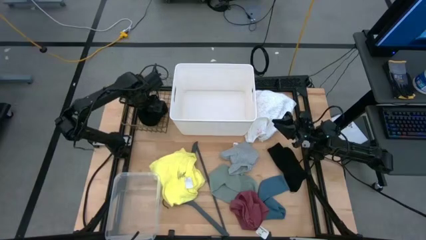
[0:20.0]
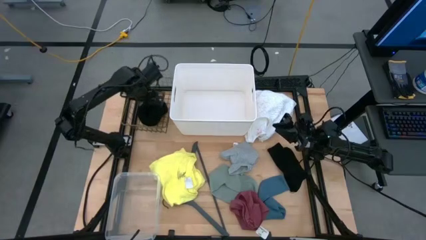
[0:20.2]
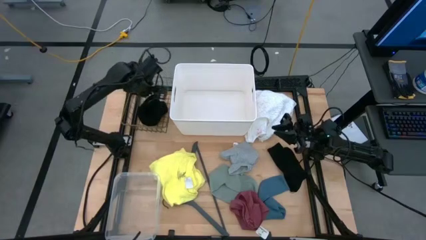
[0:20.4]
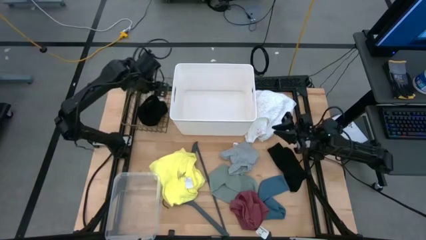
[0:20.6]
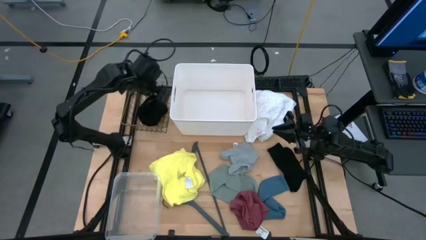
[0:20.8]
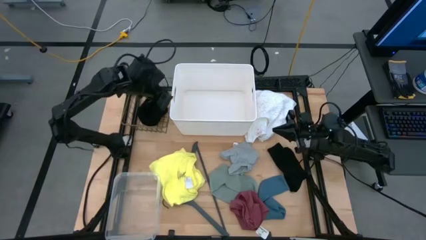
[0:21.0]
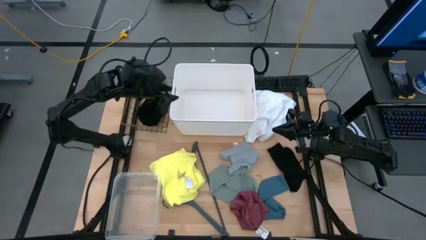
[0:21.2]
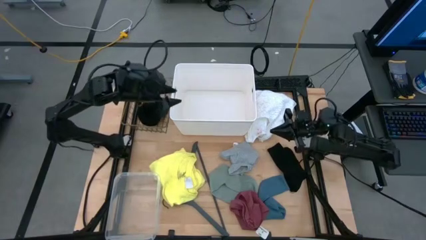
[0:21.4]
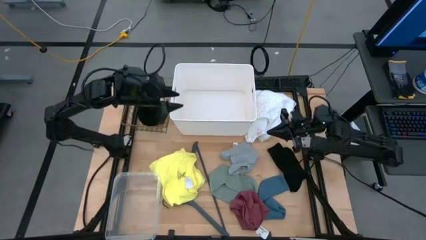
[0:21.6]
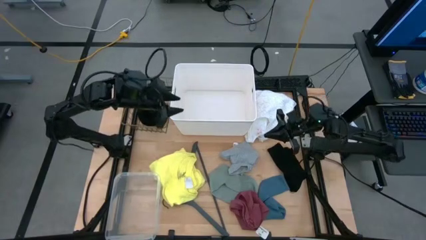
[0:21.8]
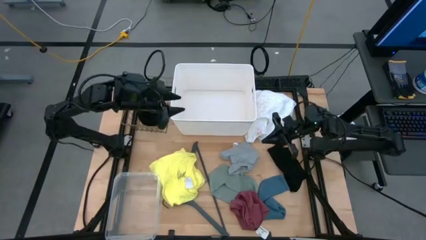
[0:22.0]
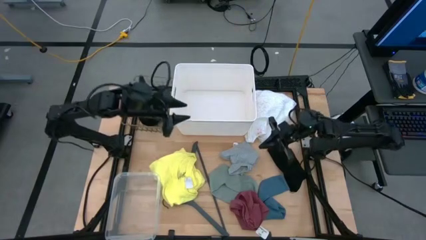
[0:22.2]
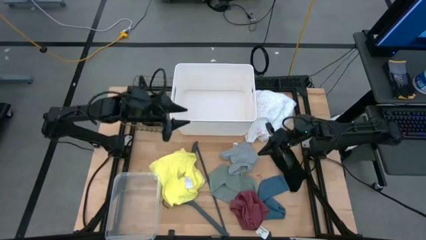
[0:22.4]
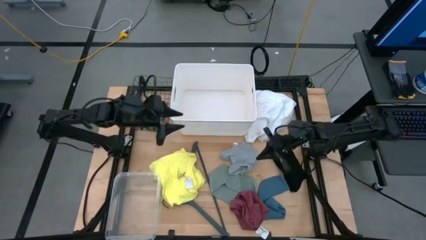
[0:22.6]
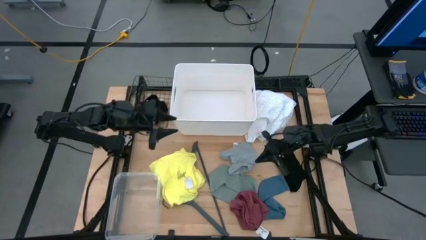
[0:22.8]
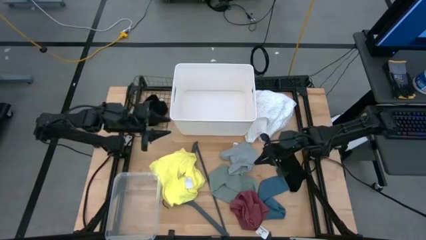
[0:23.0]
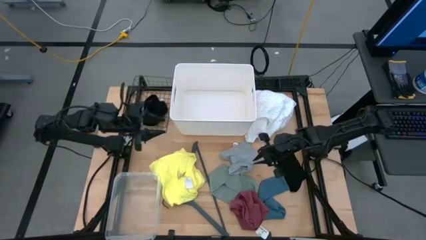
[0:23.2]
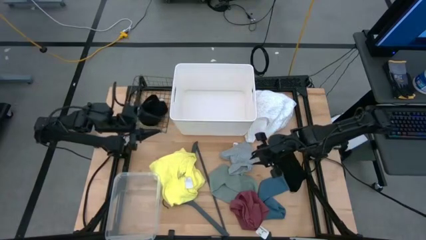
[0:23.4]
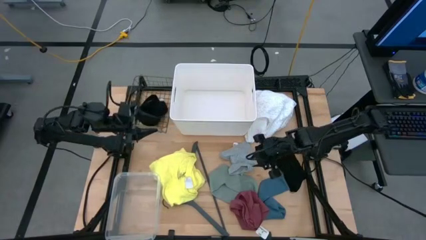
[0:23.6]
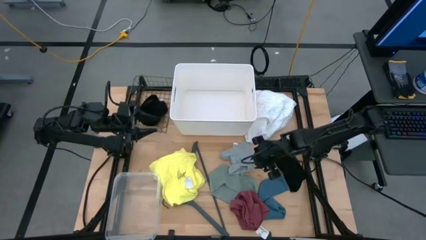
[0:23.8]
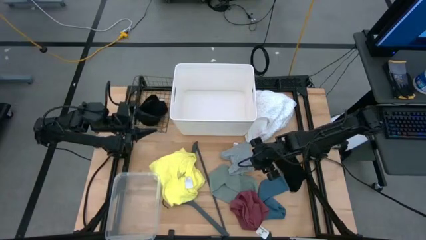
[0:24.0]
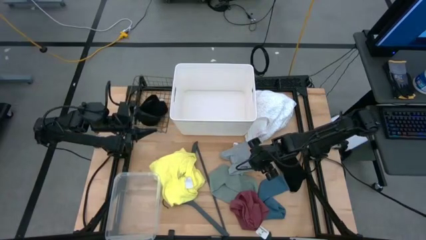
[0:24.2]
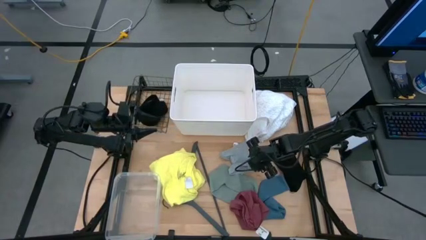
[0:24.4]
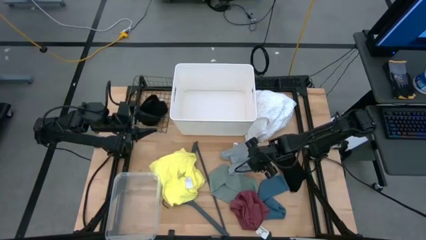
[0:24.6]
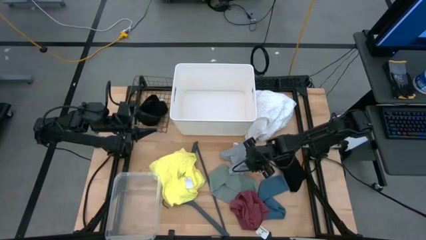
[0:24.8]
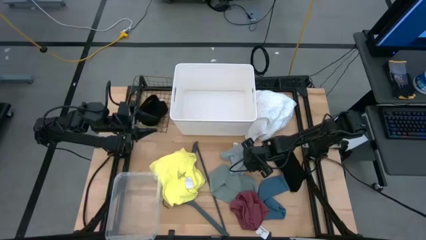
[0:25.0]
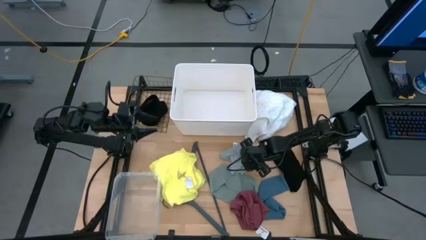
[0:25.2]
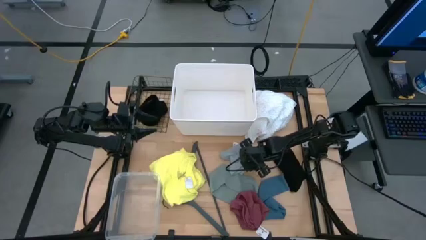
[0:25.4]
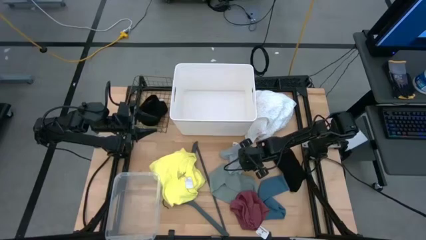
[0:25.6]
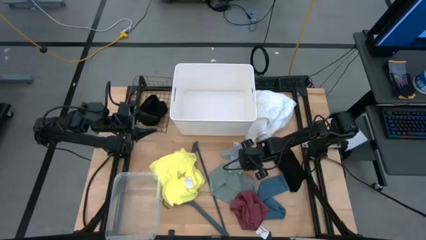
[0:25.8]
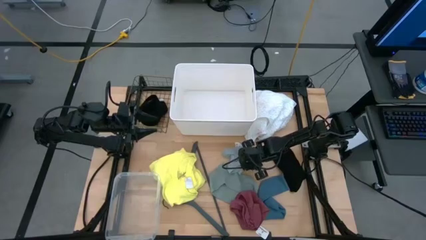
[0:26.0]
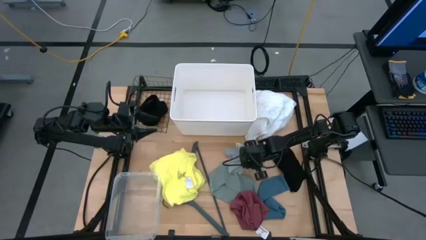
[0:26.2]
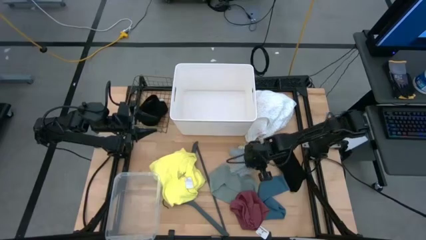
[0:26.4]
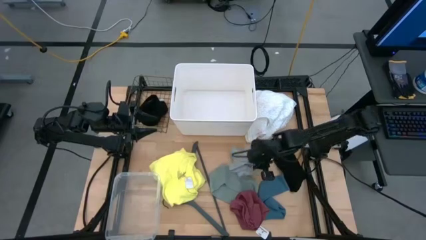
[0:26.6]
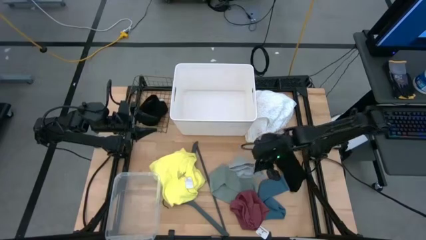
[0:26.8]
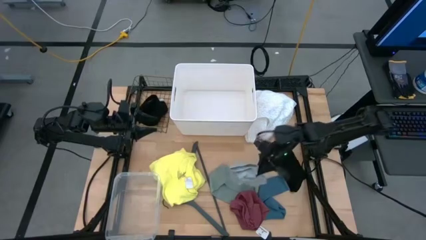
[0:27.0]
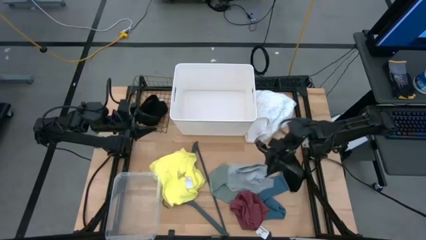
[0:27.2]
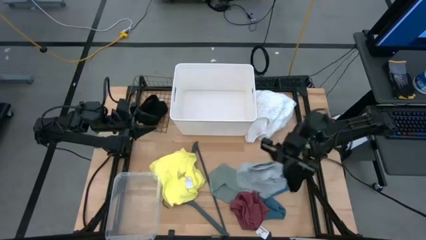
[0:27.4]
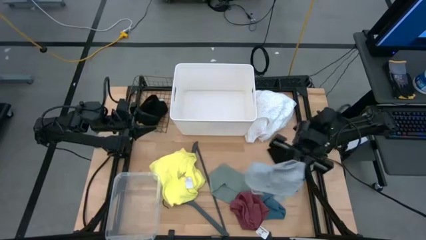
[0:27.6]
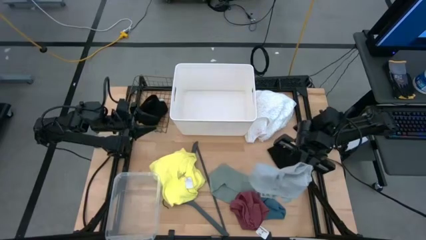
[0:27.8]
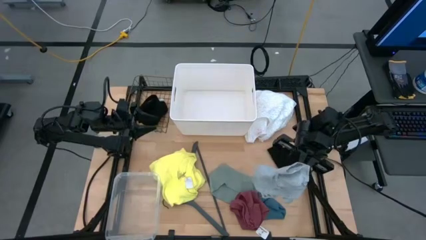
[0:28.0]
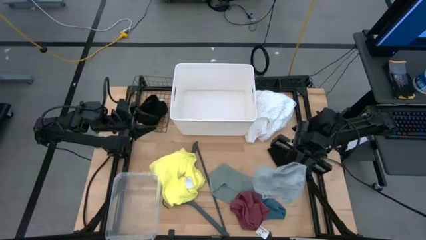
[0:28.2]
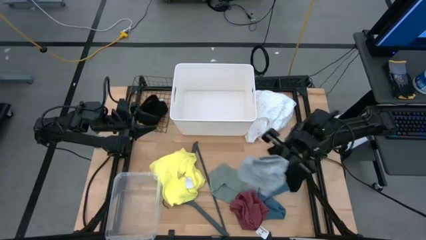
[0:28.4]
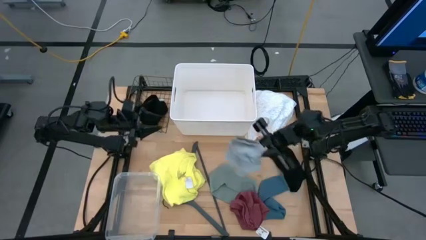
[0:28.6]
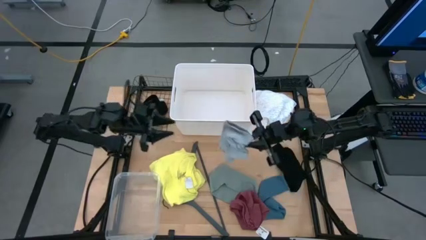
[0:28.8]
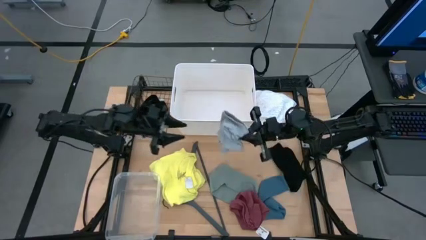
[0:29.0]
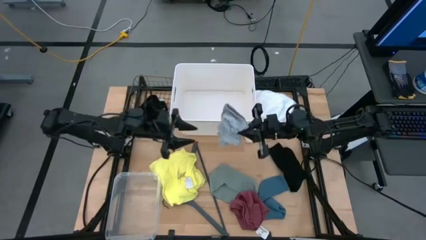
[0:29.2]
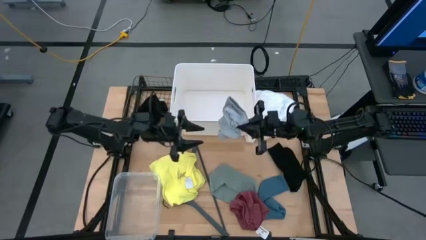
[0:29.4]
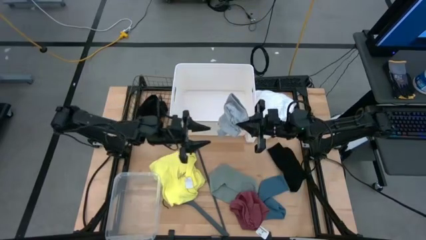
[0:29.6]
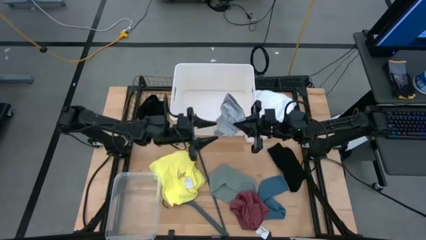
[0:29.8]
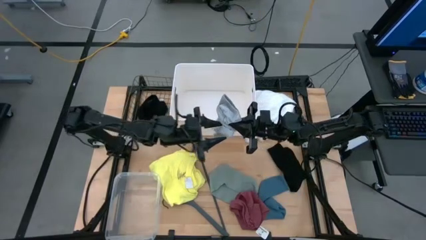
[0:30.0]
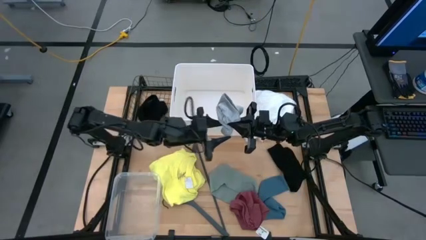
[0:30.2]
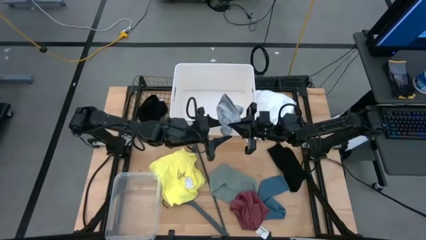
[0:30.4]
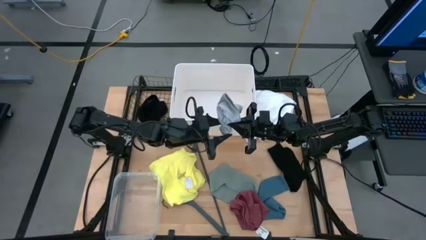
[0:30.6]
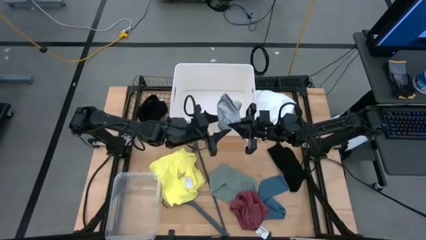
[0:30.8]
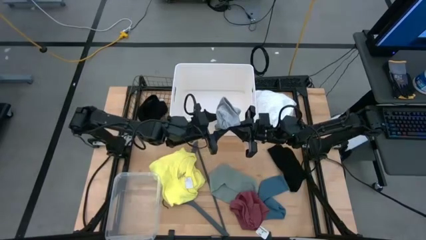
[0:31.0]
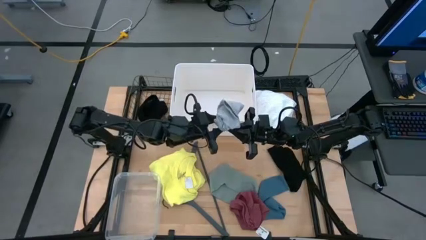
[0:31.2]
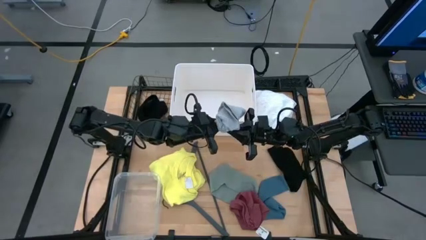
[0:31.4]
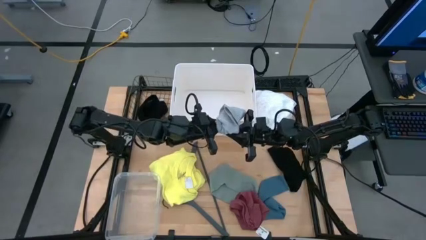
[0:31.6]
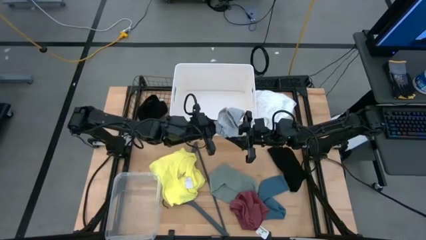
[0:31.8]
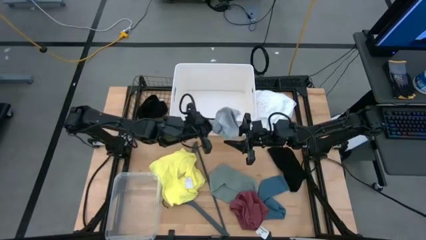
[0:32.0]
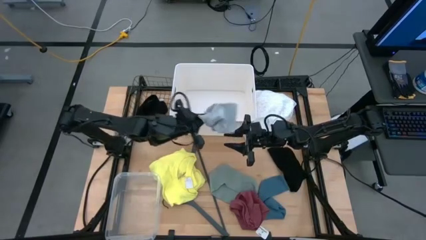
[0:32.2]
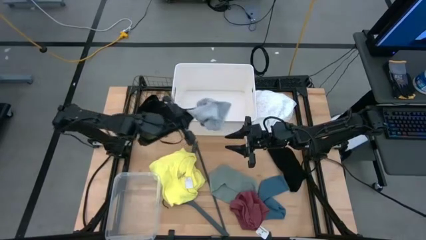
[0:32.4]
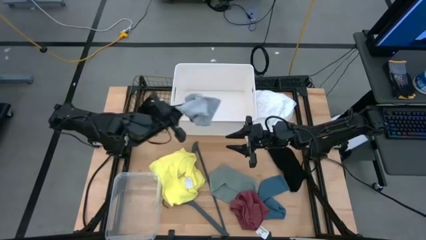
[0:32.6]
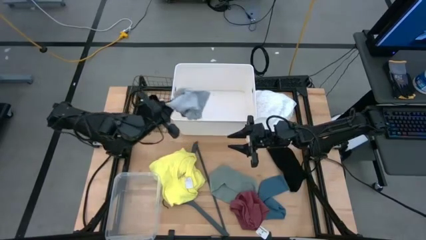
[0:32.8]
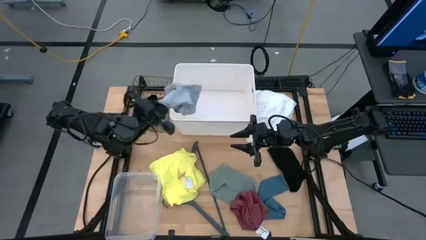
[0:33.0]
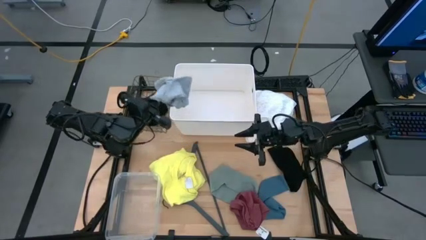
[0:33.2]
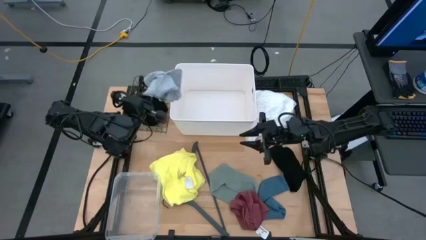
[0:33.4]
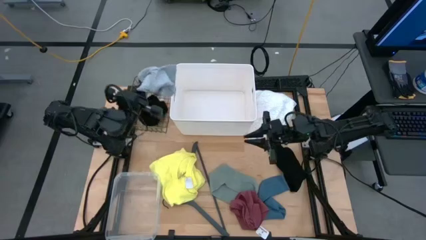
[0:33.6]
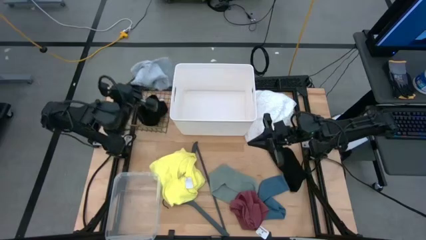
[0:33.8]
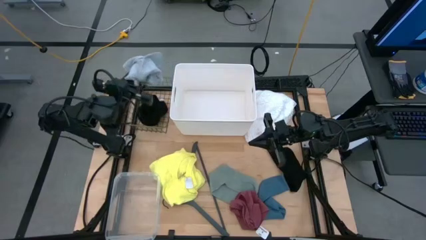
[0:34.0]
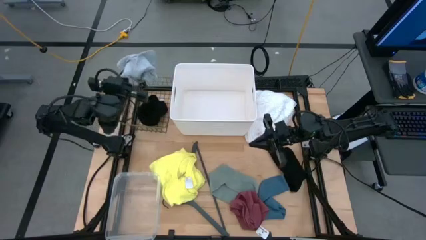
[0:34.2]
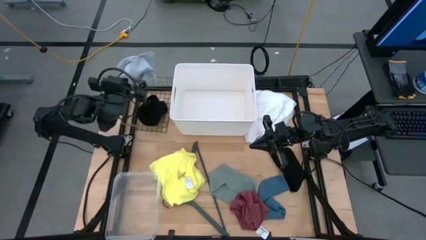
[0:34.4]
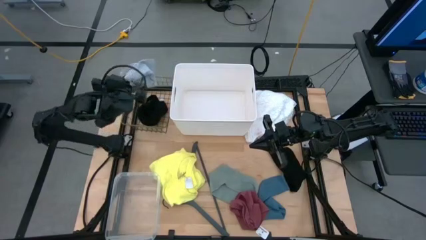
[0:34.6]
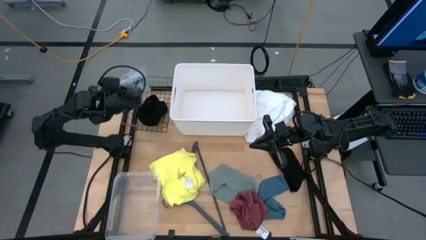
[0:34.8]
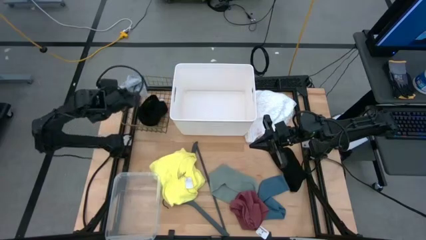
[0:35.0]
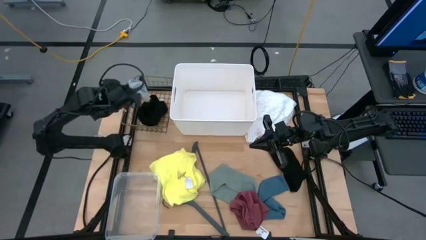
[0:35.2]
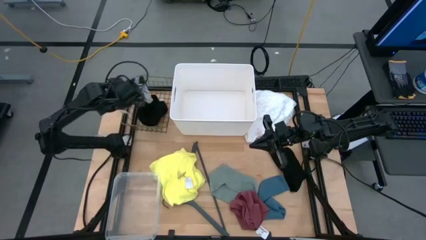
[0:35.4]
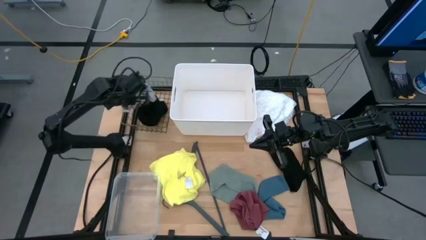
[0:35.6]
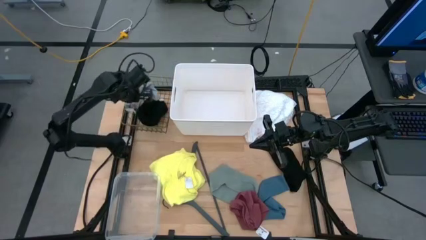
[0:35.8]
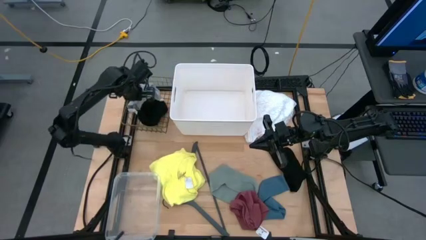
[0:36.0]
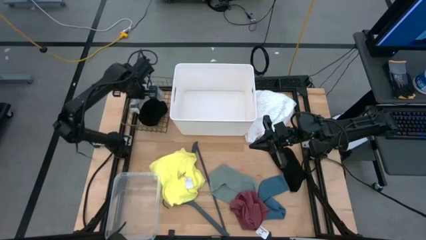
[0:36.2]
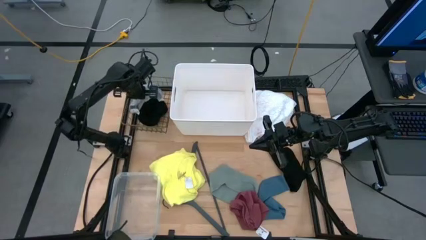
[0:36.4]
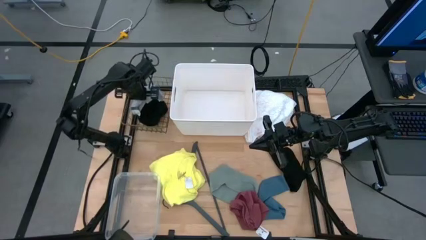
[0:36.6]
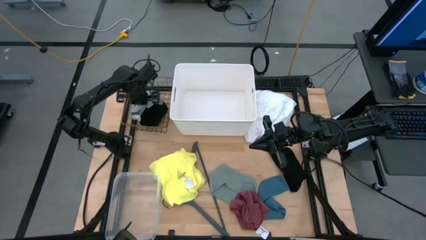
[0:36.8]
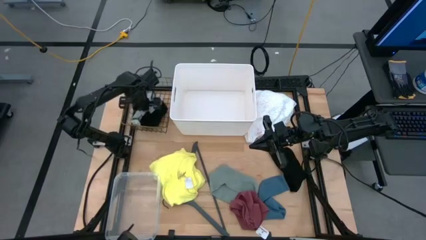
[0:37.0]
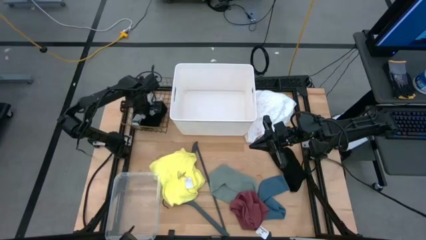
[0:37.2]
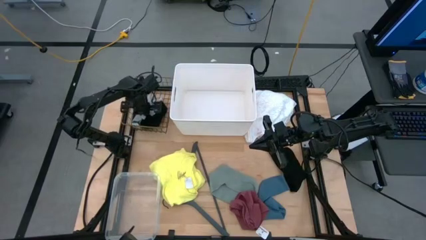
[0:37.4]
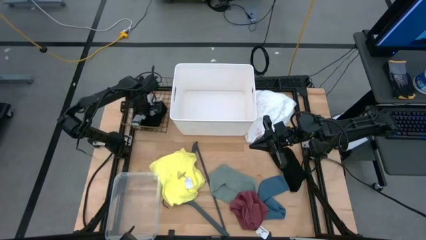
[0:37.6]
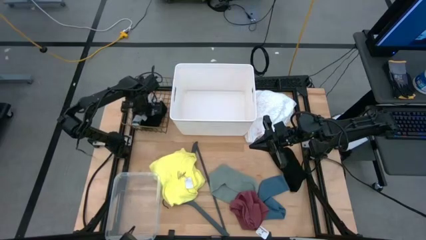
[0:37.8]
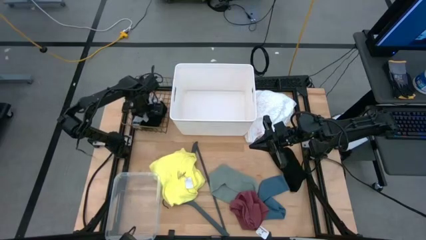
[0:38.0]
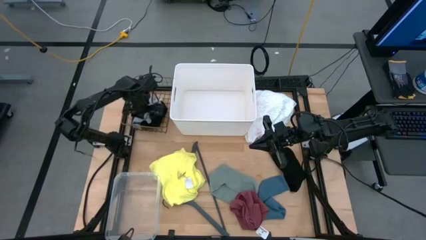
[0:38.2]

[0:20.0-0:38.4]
Task: Pick & Place Cloths
Put the gray underwear into the wired basket
